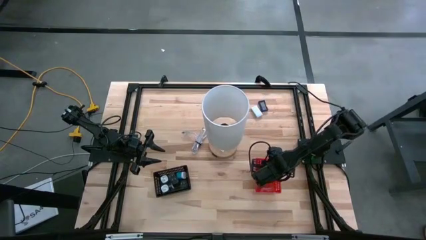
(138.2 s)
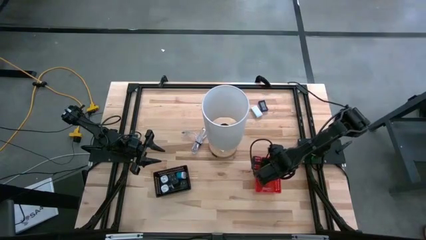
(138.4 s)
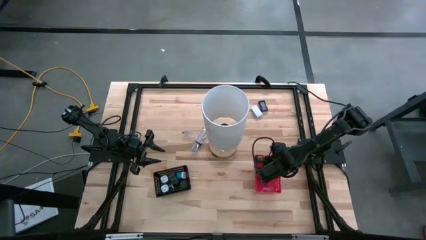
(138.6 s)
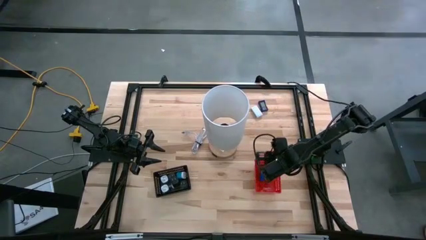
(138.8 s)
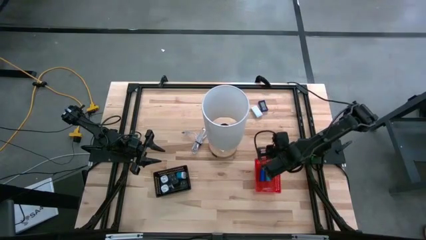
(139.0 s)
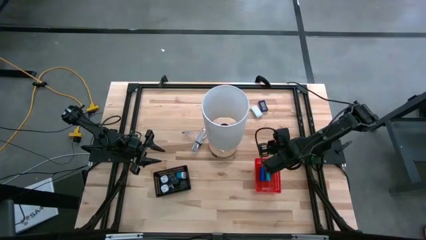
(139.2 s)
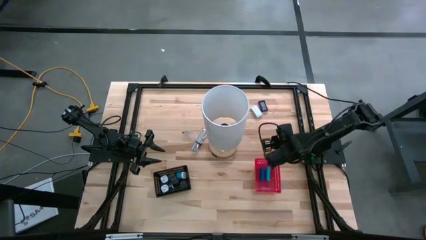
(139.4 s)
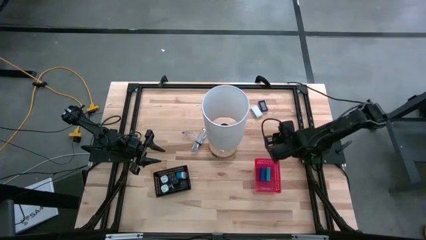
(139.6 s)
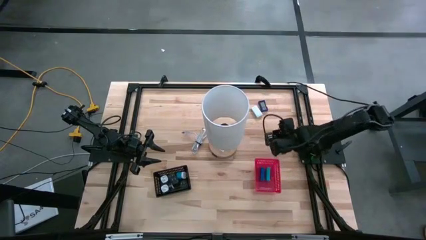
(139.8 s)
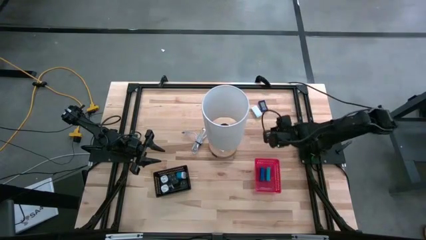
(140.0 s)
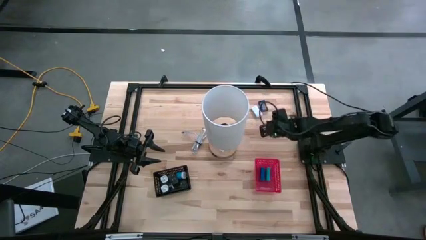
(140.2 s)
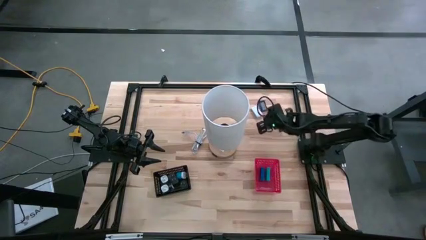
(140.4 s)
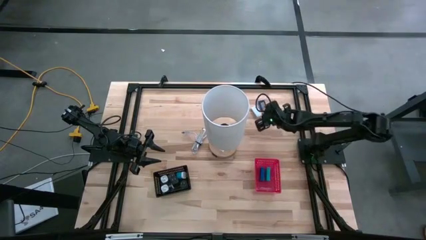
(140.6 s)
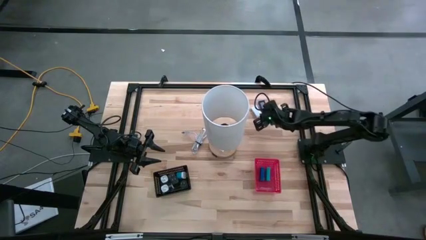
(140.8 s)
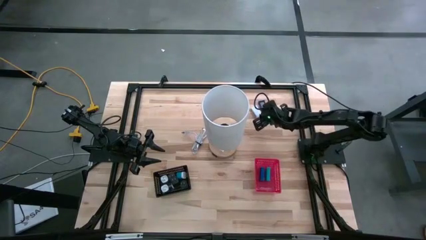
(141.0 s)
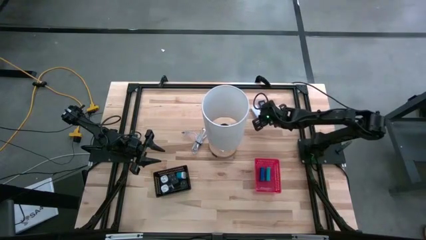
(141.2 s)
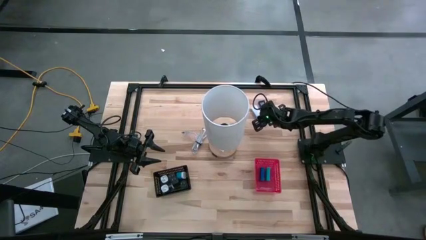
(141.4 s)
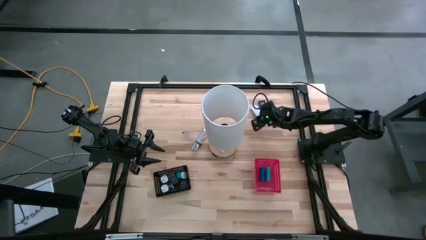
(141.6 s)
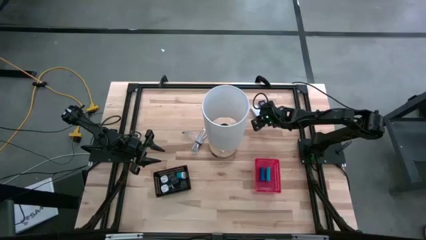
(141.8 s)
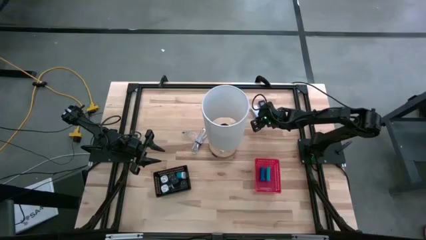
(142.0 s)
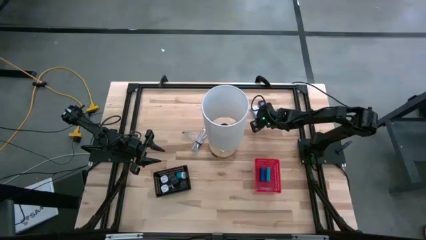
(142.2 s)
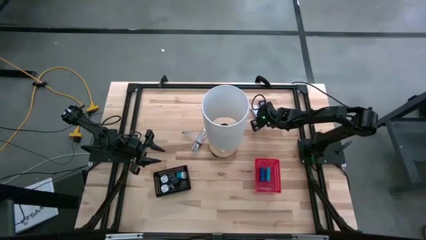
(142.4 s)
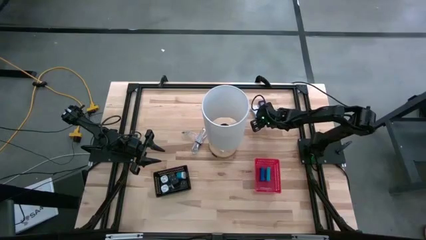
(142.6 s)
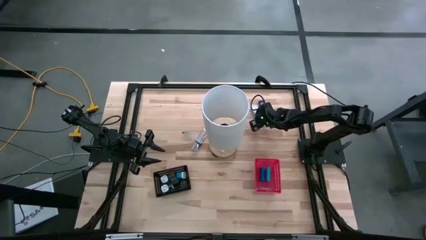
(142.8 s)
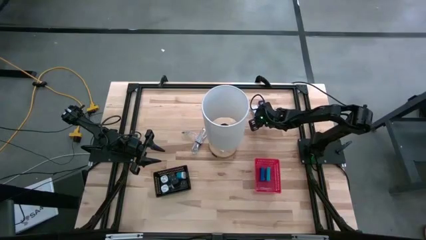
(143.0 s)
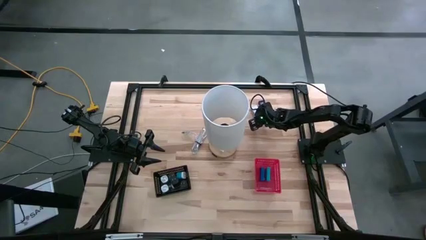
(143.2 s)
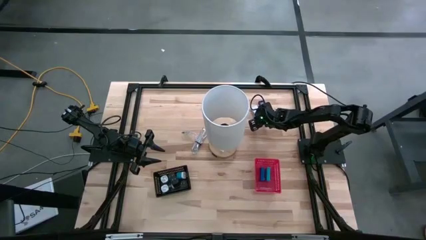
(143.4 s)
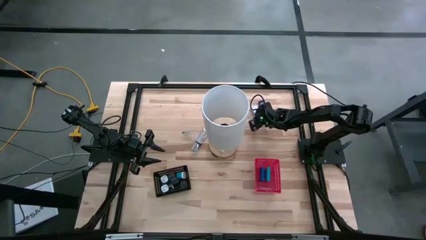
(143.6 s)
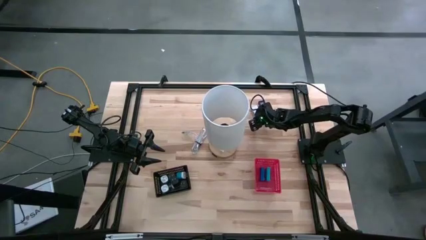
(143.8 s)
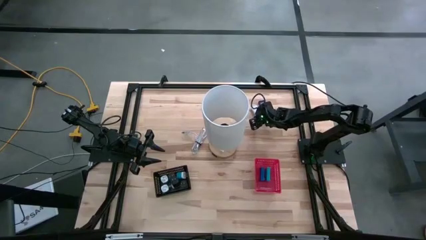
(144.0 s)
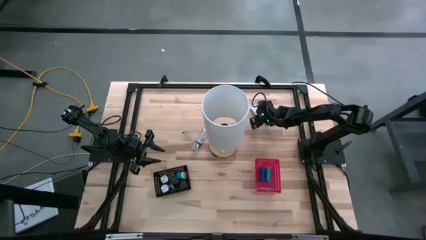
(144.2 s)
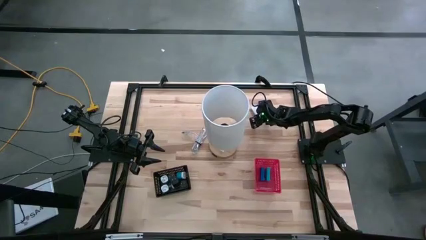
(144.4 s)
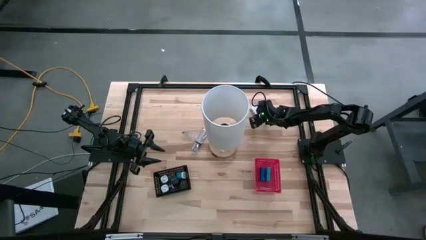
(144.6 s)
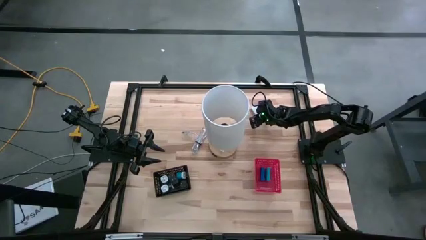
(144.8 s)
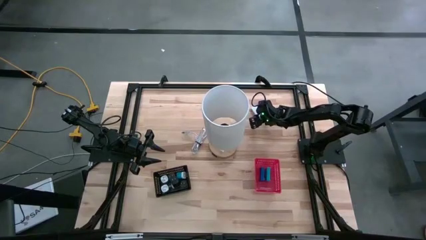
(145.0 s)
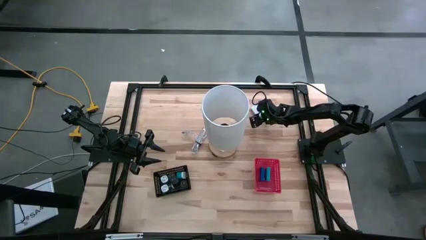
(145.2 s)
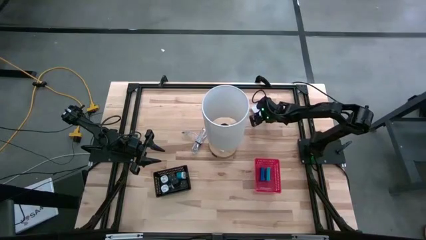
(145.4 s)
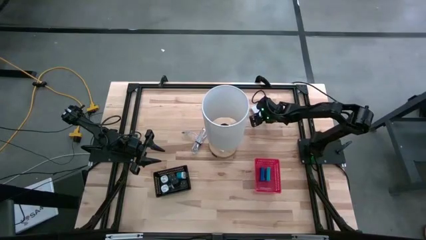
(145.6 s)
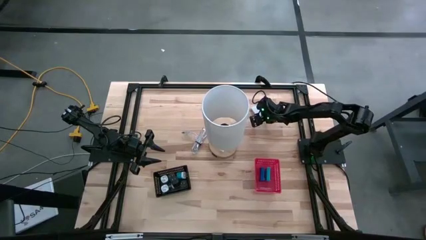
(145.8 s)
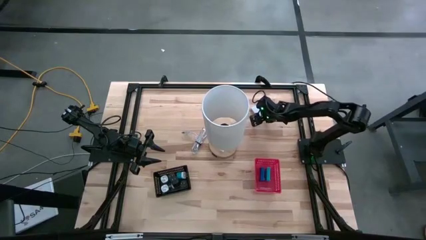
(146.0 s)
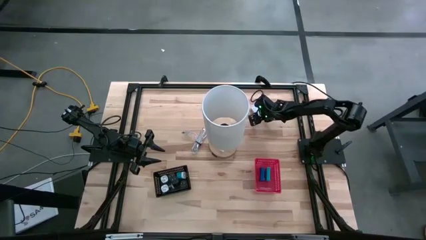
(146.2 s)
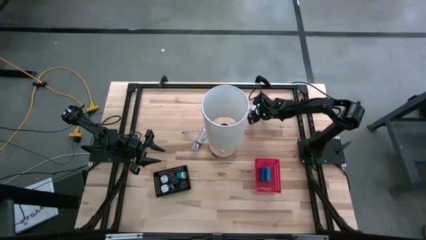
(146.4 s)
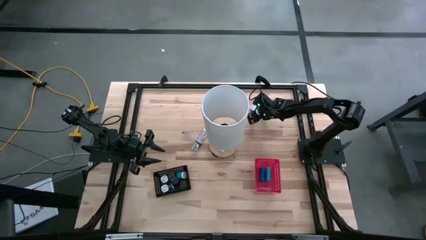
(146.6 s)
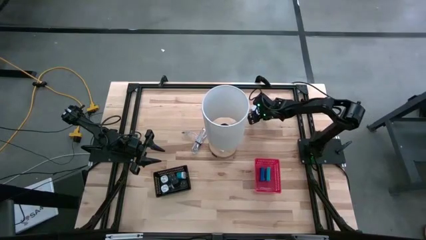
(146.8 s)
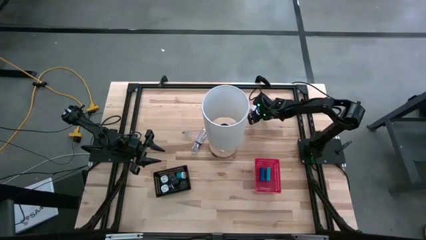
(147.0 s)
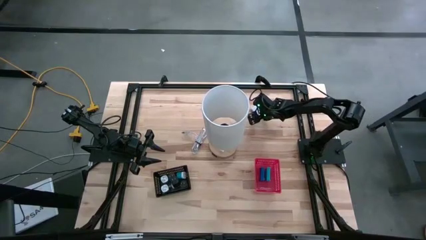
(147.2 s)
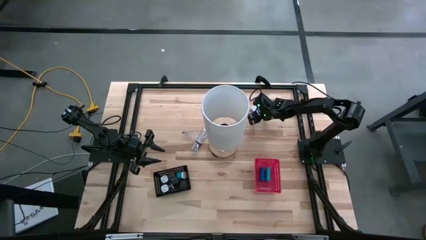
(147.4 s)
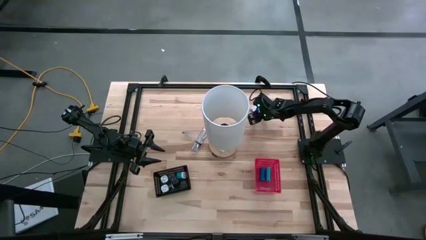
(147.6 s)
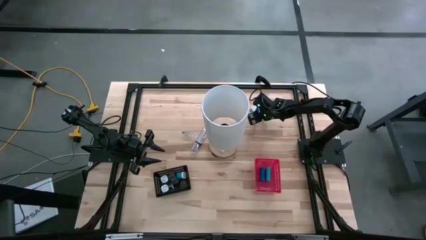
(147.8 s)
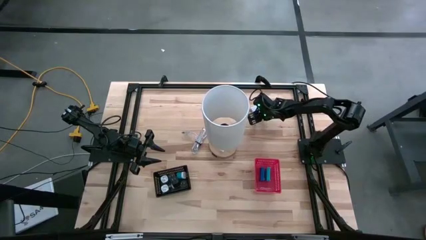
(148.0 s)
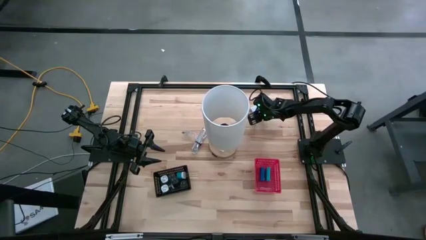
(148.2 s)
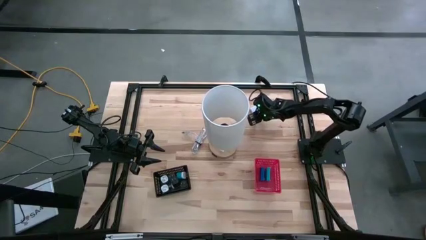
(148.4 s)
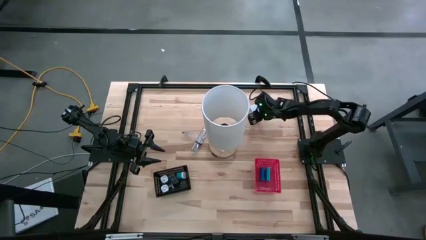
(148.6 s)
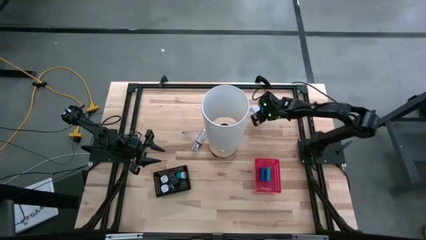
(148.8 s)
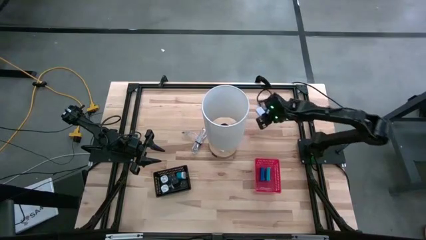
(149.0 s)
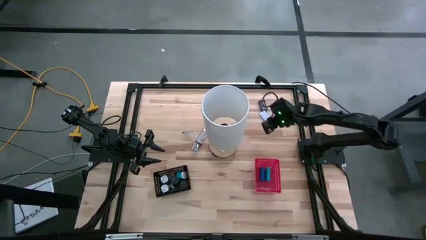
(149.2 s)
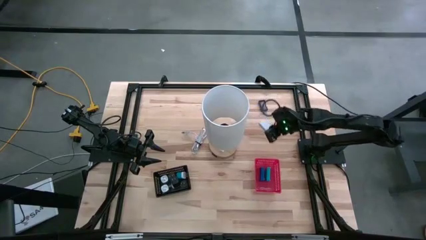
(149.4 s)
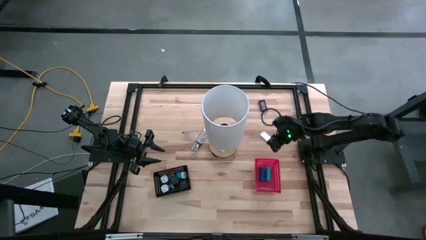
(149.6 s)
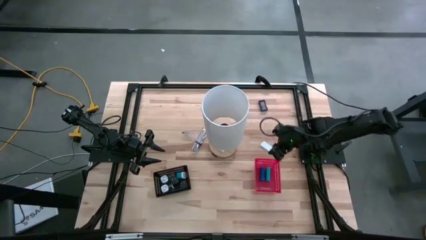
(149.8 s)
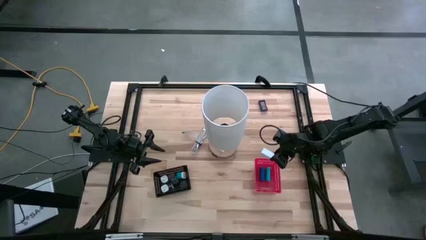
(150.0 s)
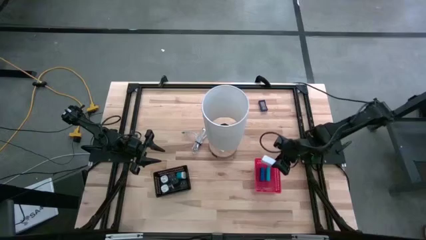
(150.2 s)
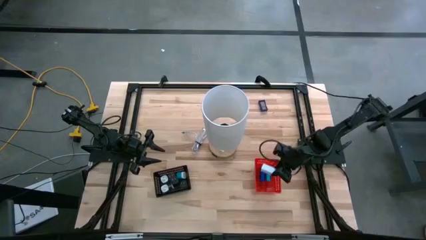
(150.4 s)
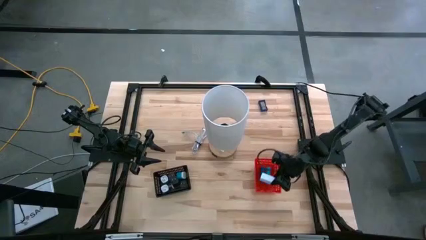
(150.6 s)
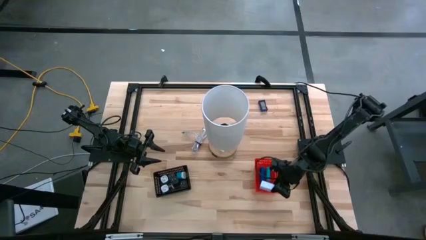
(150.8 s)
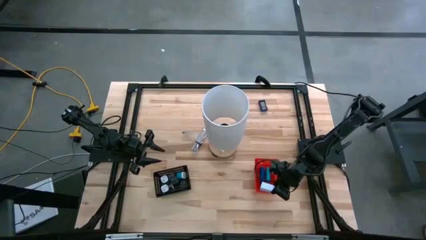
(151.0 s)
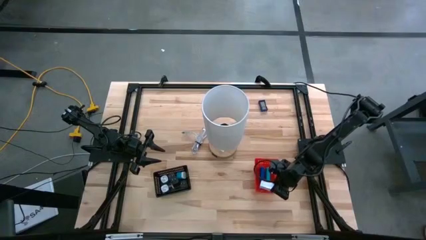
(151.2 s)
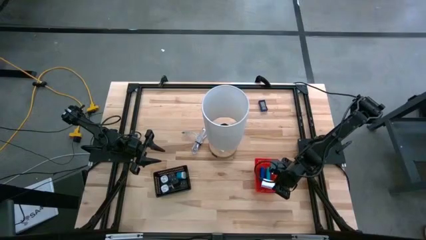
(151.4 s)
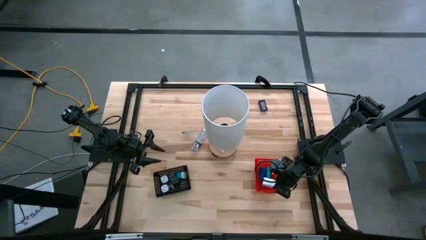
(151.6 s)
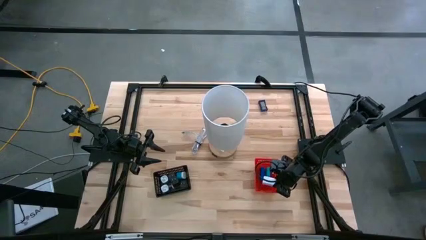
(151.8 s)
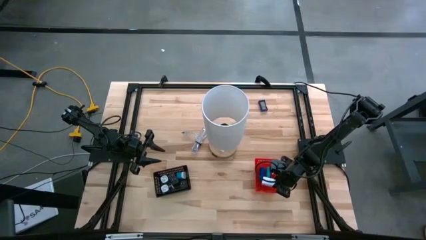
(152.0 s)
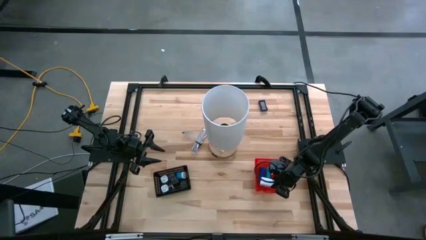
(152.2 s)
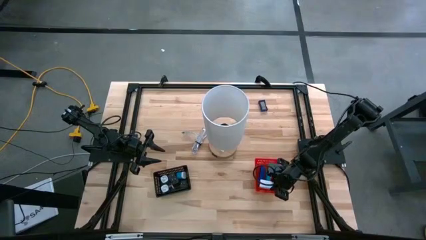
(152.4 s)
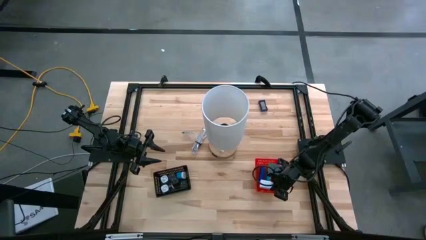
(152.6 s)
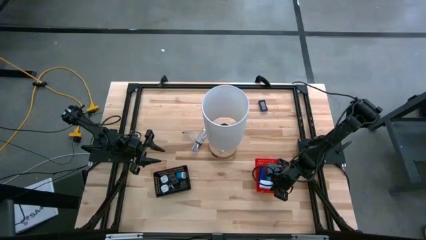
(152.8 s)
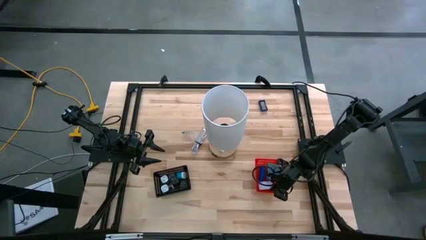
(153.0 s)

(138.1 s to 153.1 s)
Task: Pick & Place Office items
Put the white digital clock into the orange bin
